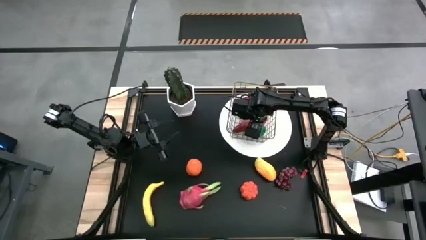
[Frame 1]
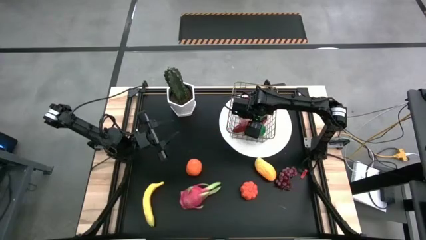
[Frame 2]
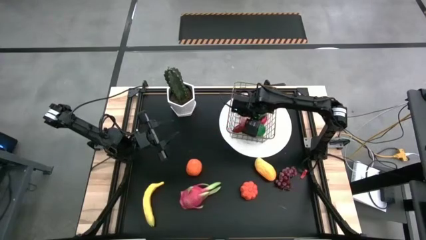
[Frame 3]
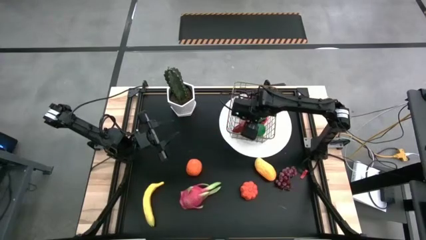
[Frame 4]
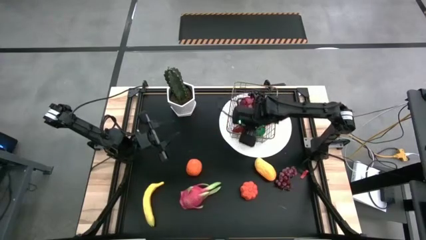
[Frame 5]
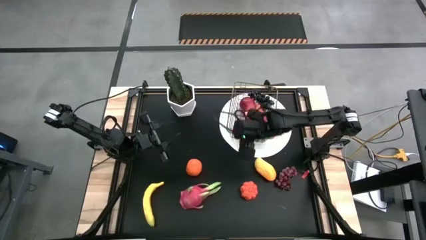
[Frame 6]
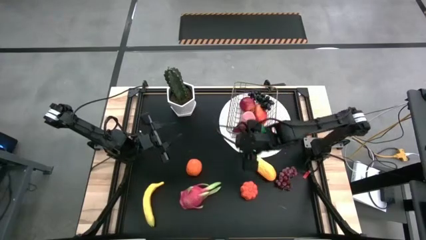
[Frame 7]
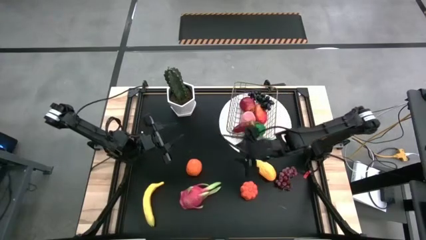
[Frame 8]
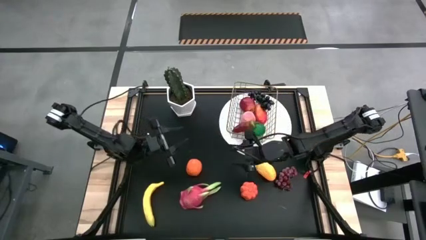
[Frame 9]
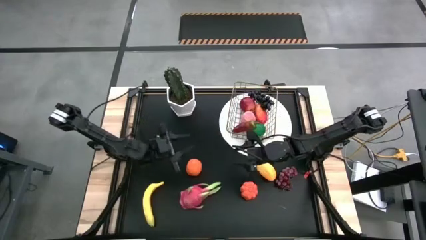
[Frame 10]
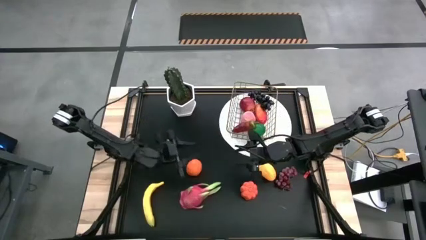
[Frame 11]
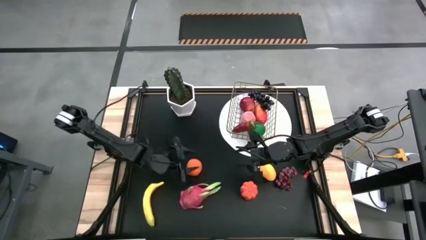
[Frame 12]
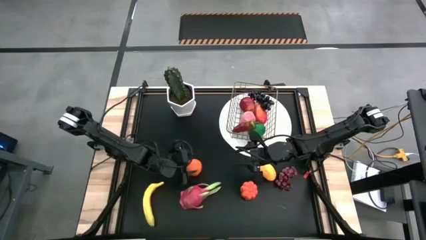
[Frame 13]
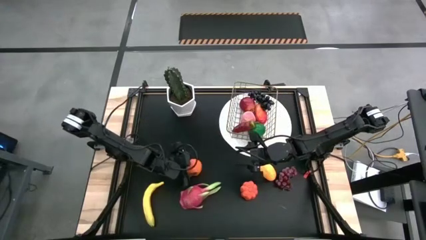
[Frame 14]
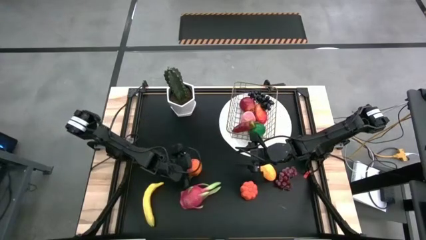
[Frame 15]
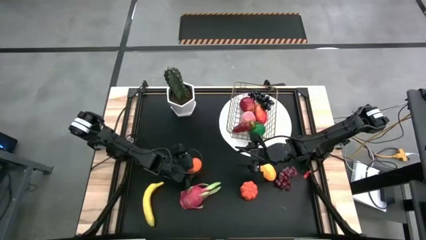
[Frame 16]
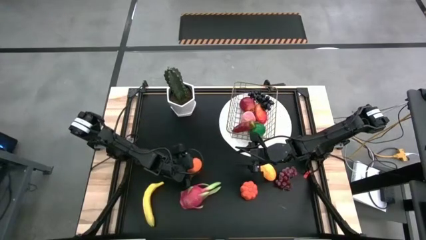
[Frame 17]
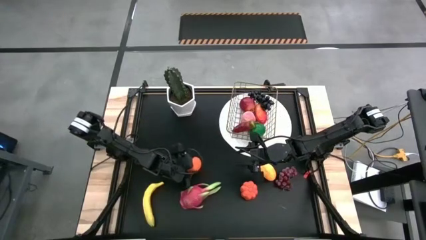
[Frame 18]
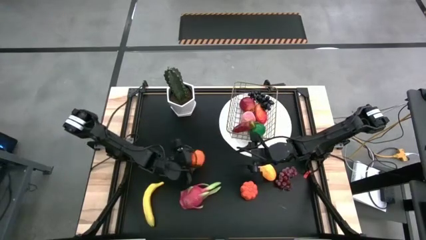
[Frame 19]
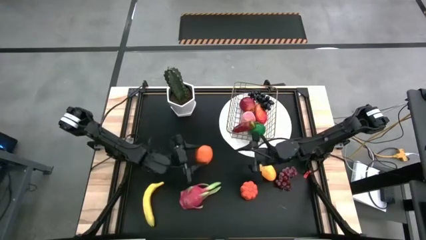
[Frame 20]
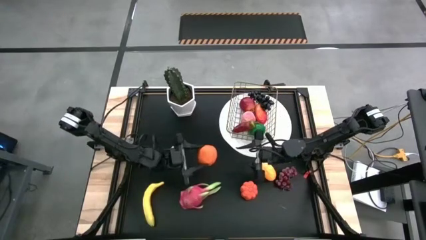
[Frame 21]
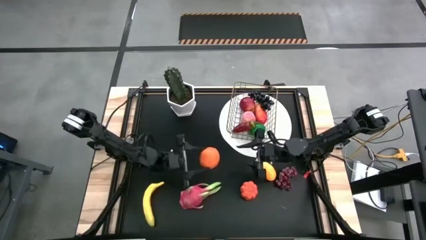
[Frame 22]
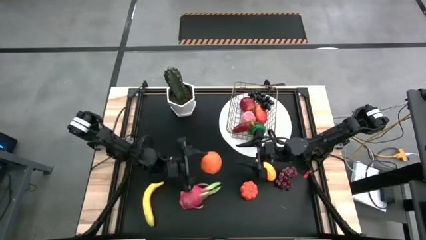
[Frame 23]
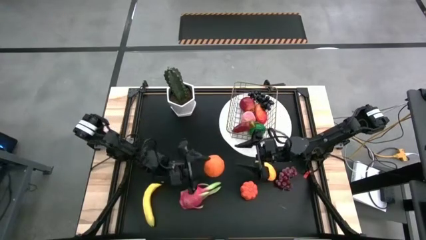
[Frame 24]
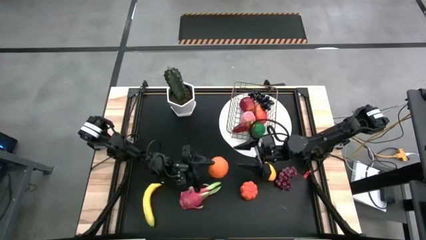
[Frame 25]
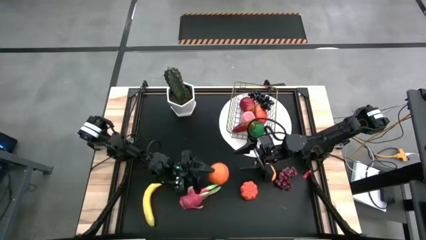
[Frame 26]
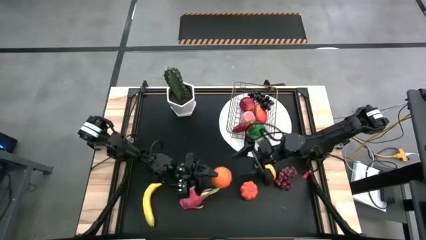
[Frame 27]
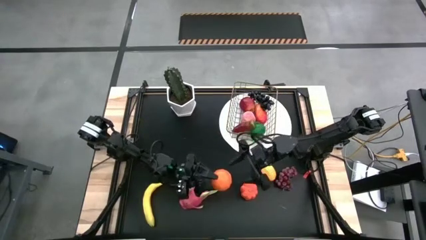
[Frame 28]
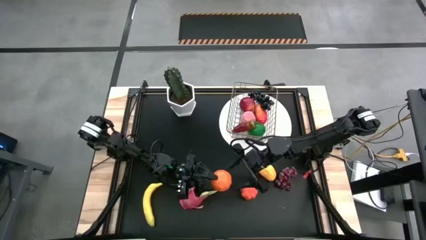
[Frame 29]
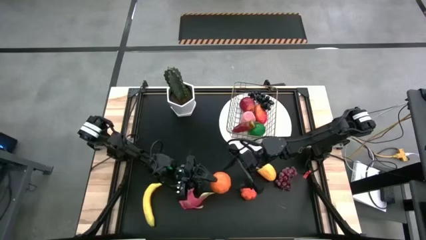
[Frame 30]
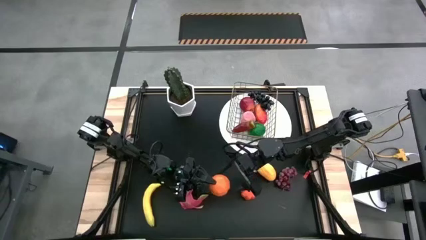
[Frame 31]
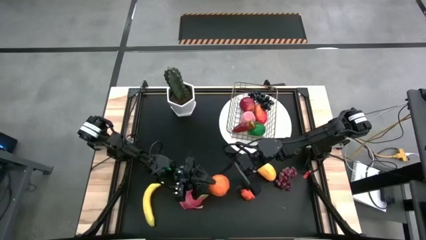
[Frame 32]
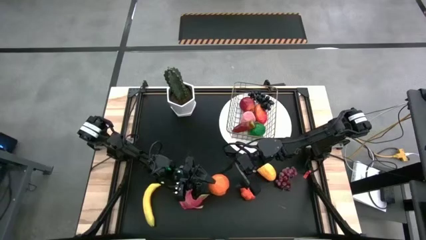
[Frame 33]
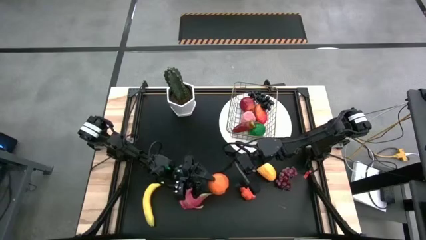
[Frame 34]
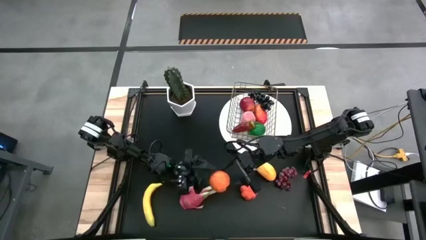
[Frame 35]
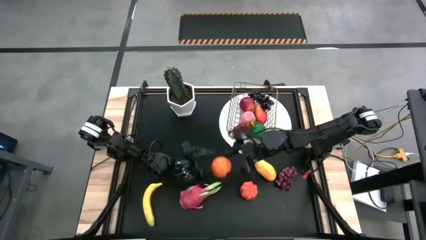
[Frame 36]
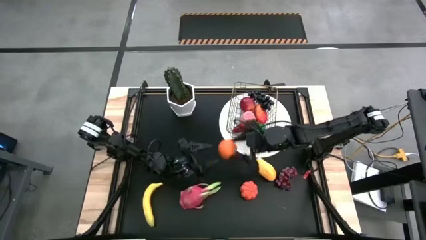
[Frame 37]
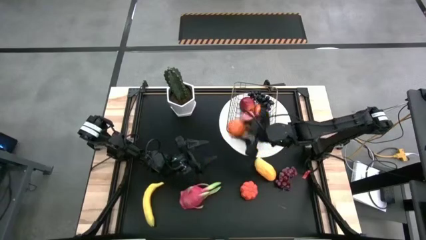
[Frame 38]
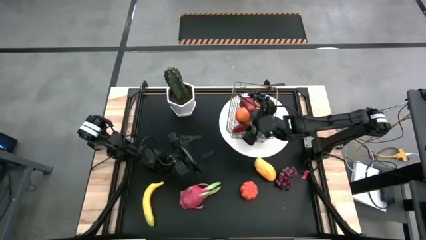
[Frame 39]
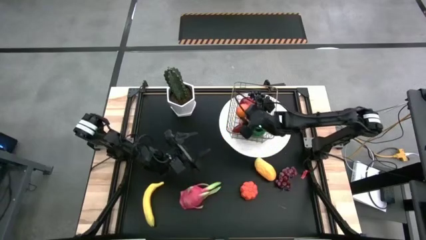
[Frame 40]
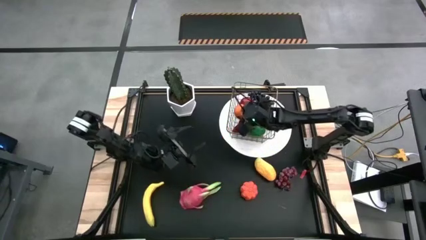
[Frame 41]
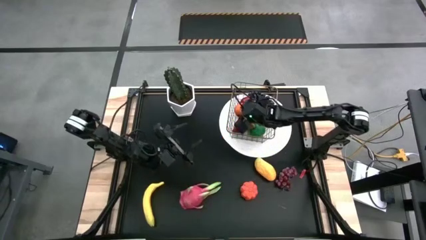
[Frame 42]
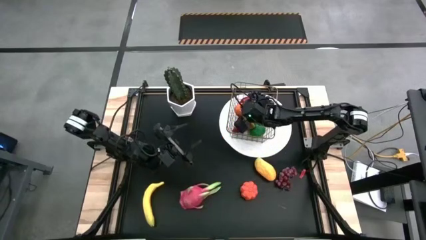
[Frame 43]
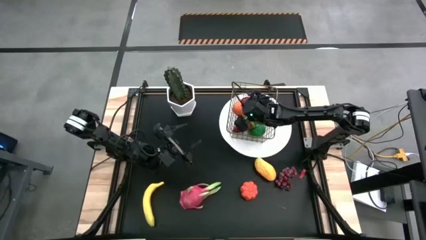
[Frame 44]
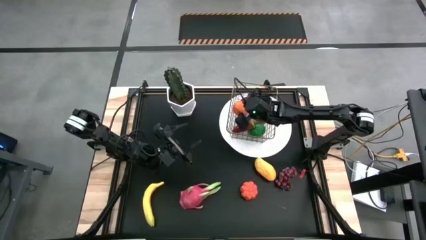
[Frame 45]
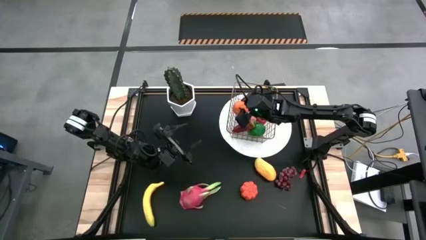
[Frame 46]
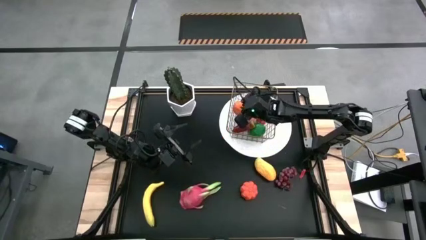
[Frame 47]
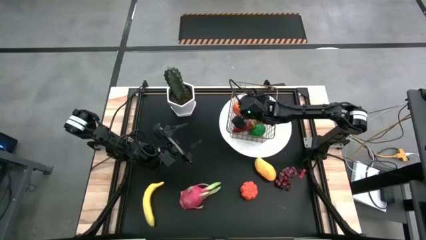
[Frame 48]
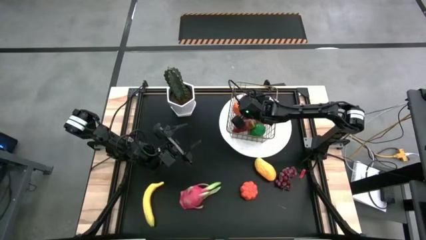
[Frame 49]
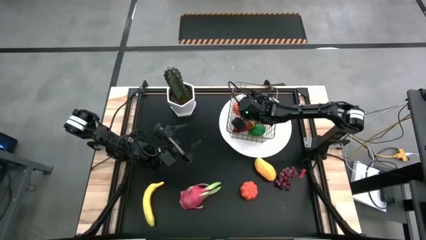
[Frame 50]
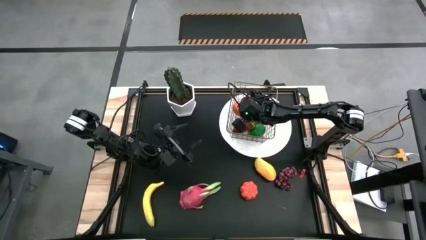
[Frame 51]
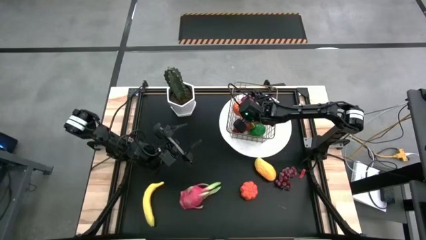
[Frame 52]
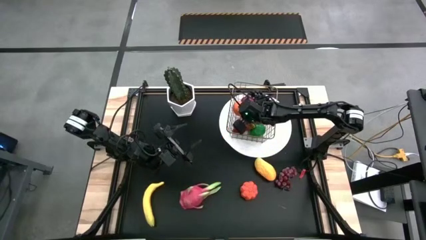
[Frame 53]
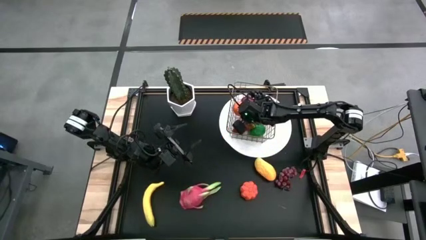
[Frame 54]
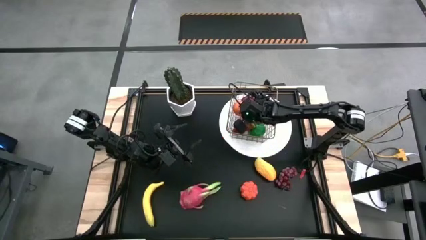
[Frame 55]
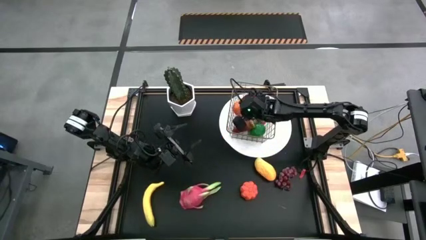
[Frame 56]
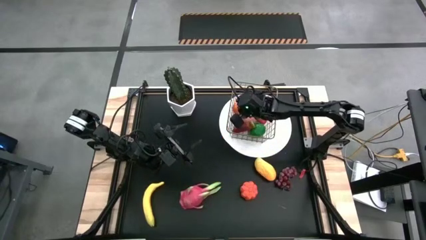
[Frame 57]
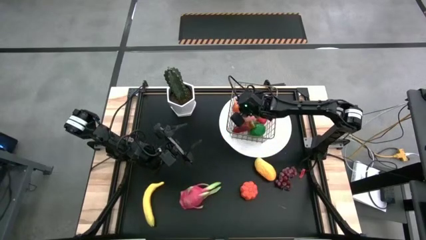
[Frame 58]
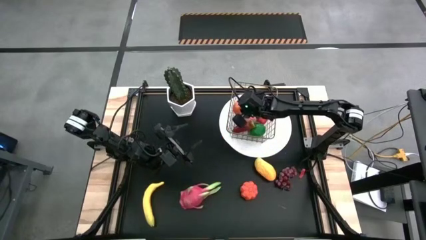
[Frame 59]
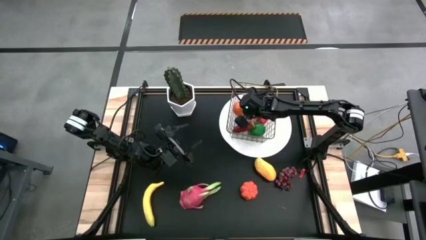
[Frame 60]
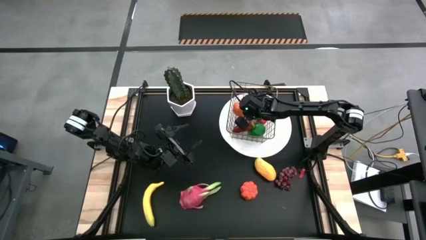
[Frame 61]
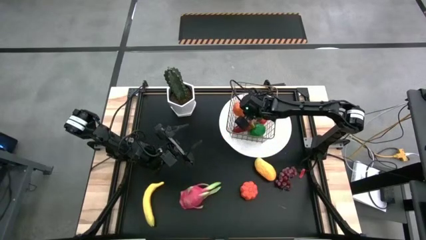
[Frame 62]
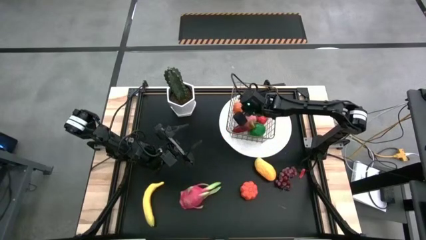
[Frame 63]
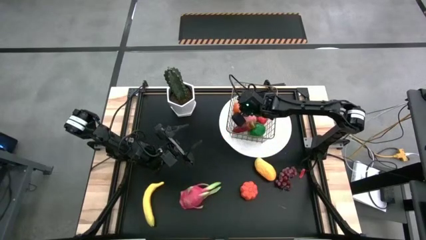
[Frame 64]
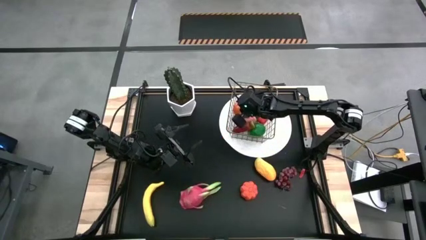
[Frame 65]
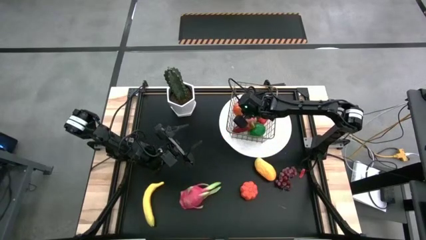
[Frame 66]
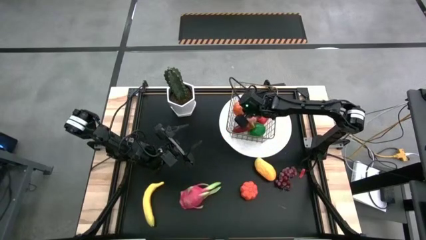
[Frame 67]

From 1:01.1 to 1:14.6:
Task: Build produce basket
Put the orange into the wire basket
